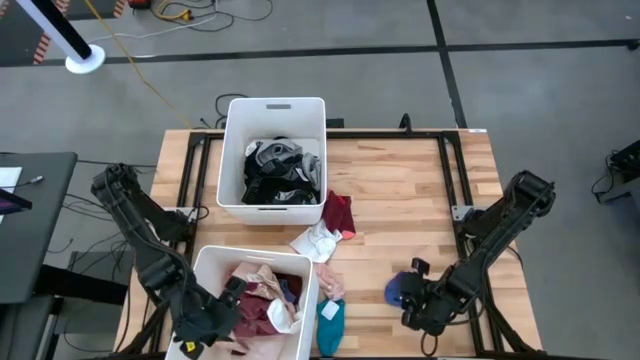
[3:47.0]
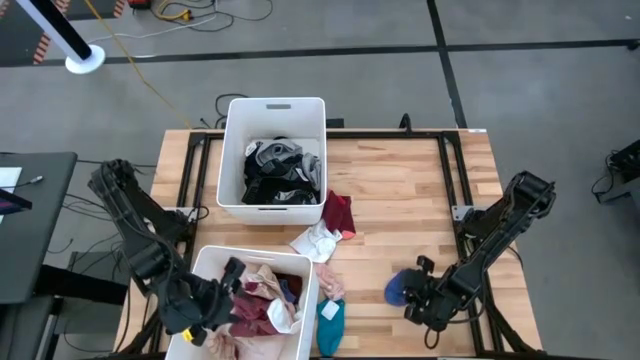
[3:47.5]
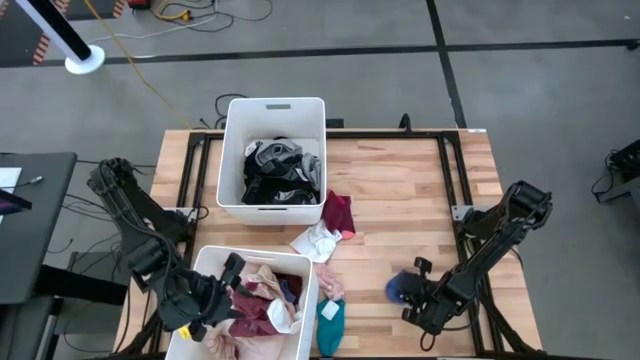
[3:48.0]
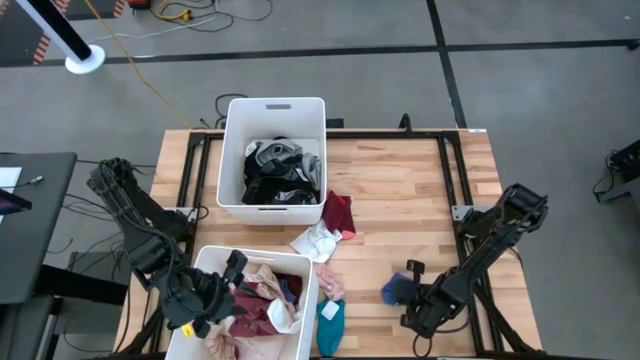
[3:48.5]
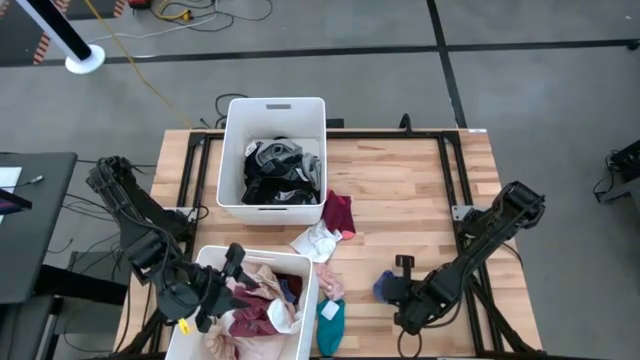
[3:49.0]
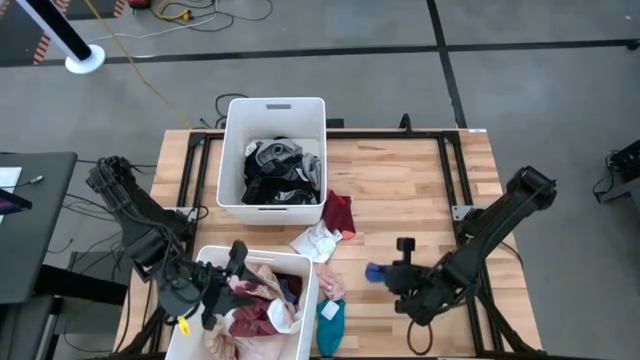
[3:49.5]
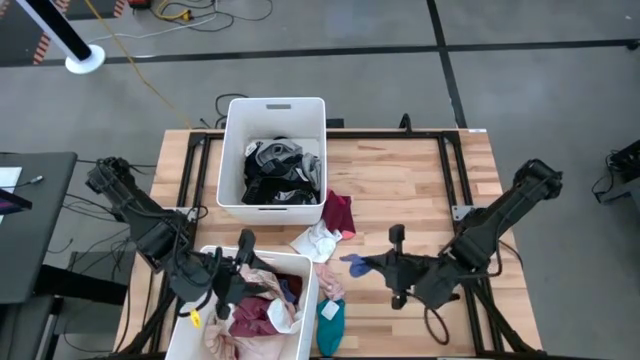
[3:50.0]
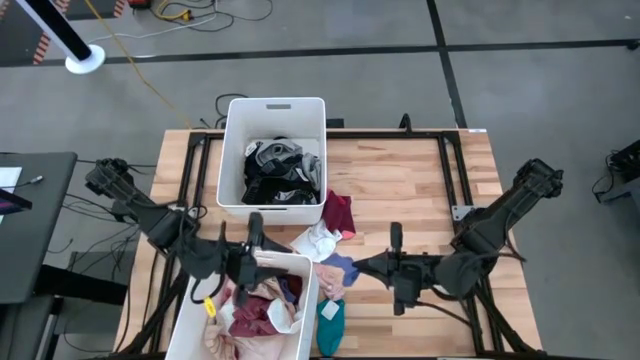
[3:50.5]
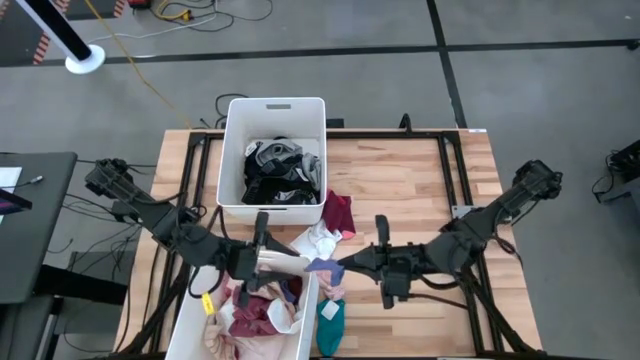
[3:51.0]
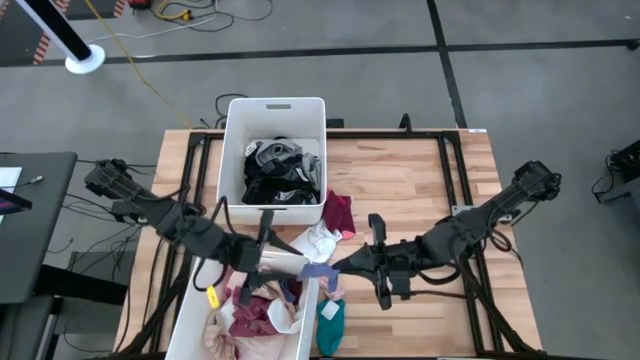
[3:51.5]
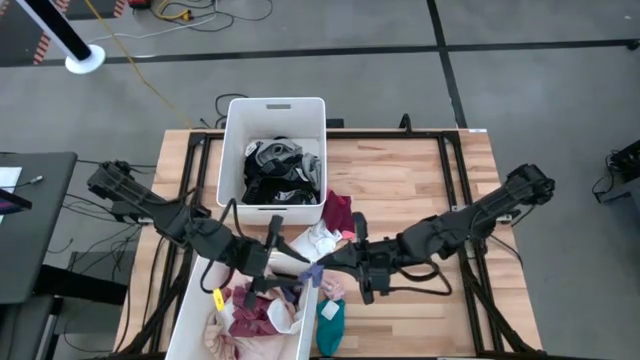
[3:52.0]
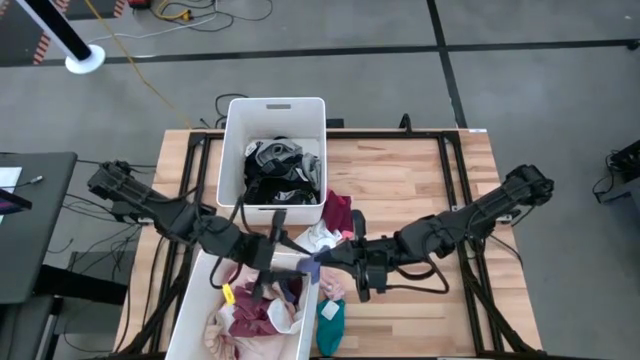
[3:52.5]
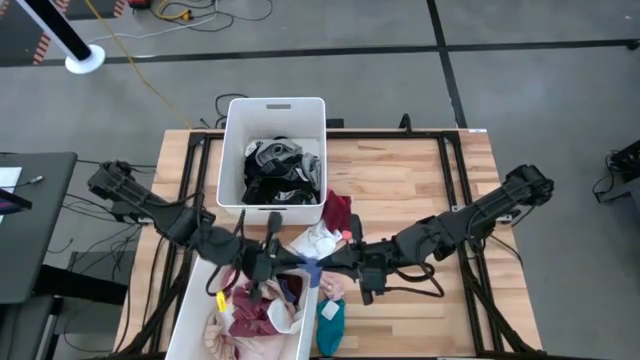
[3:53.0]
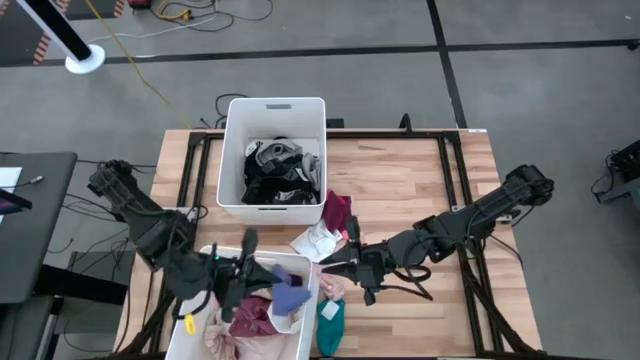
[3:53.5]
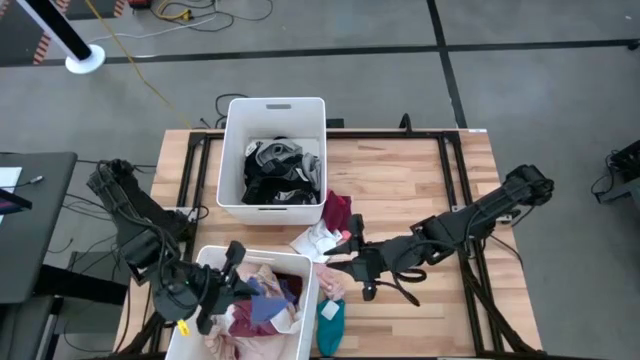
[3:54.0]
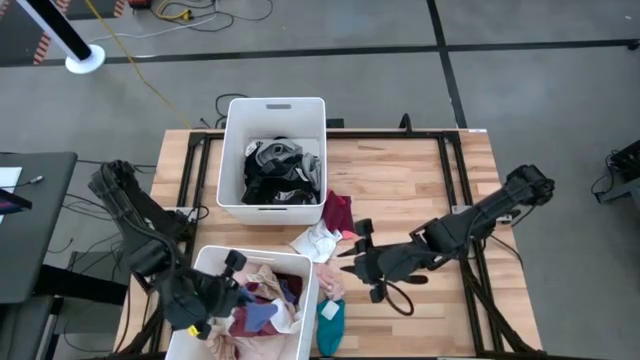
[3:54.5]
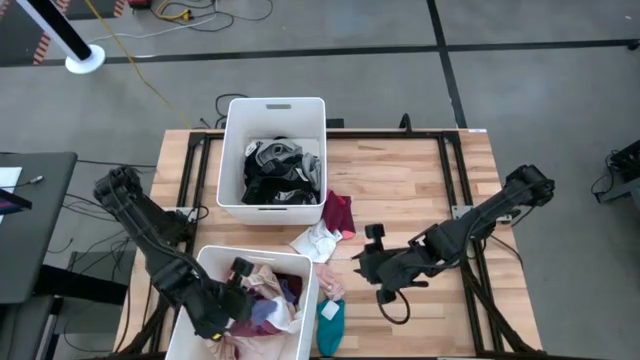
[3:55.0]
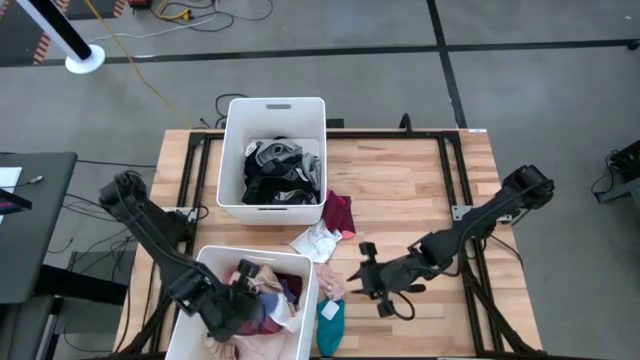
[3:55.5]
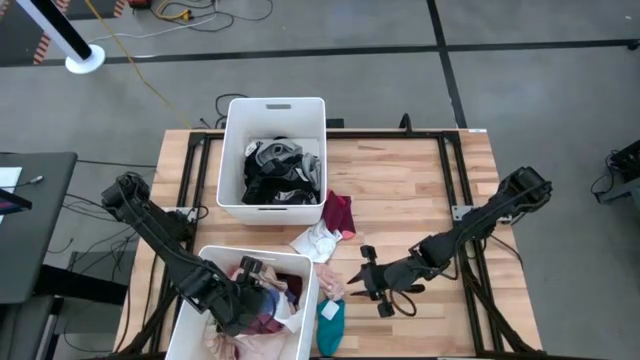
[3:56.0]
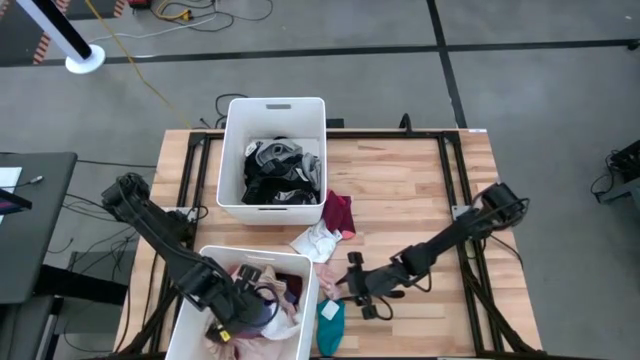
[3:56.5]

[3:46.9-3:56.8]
Task: Sort clothes
Put the purple sock into the bottom white laundry bin

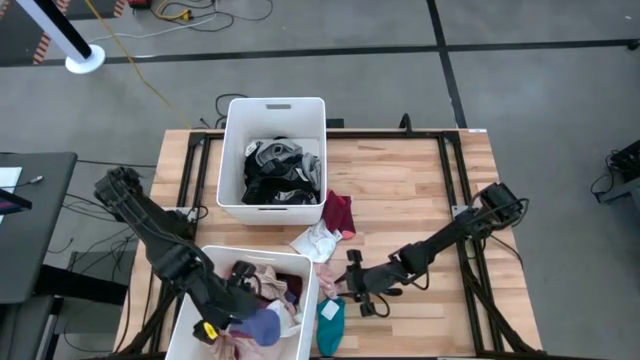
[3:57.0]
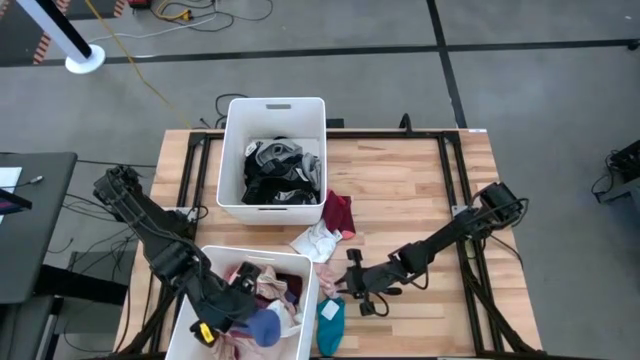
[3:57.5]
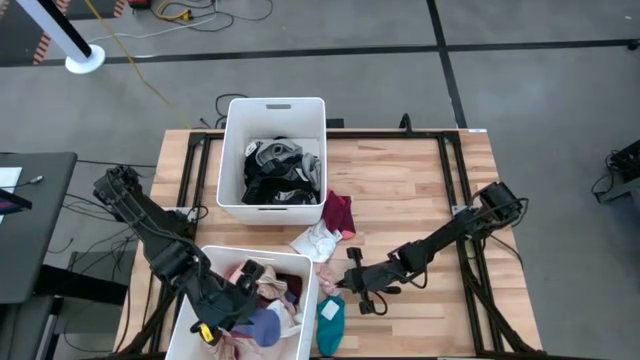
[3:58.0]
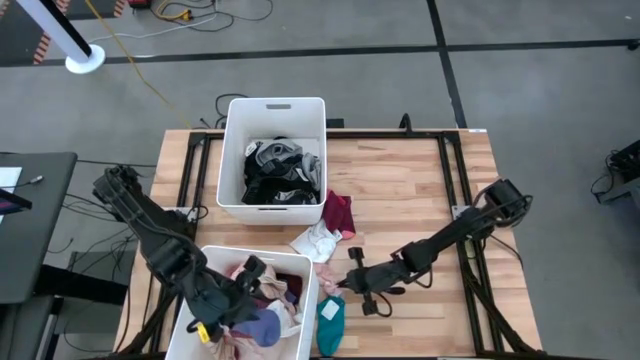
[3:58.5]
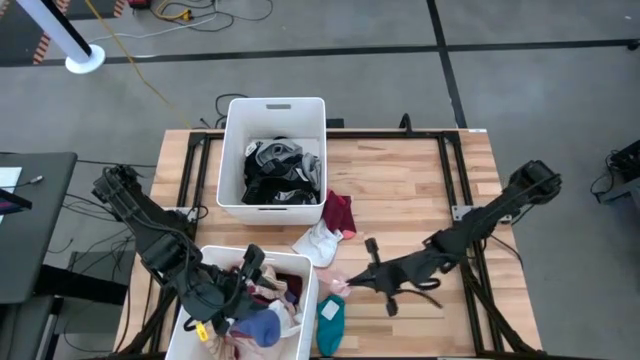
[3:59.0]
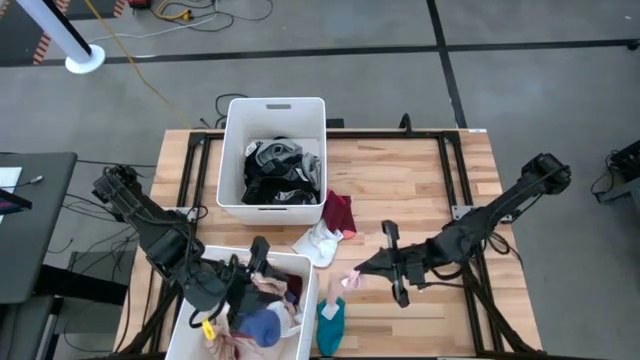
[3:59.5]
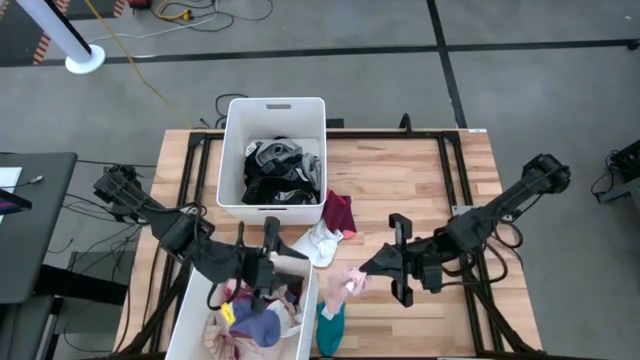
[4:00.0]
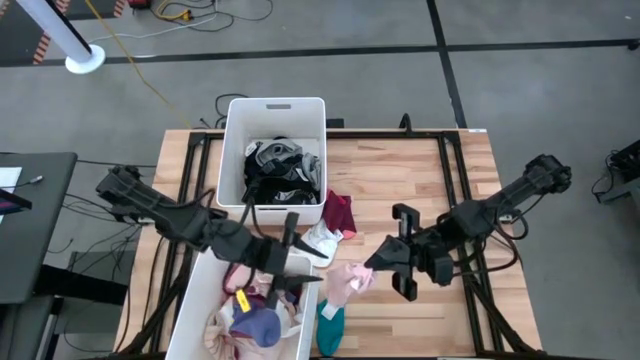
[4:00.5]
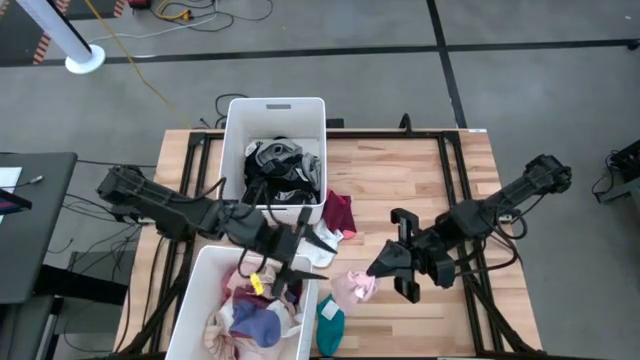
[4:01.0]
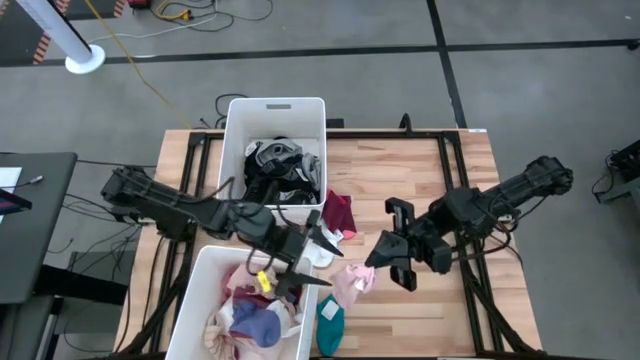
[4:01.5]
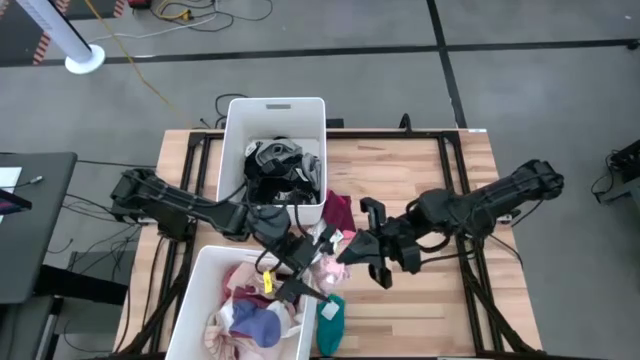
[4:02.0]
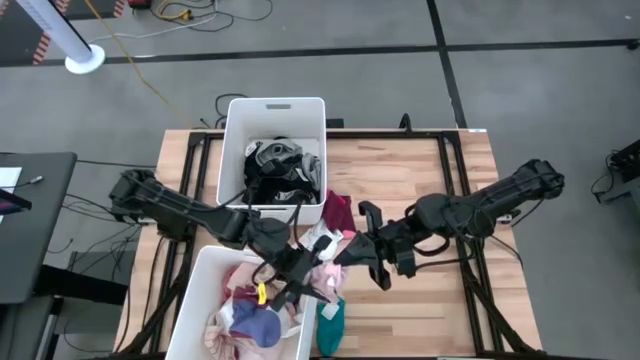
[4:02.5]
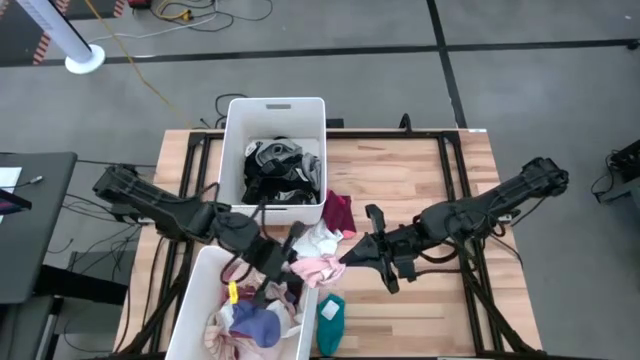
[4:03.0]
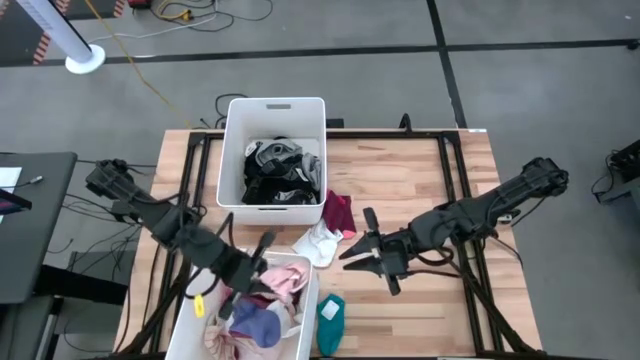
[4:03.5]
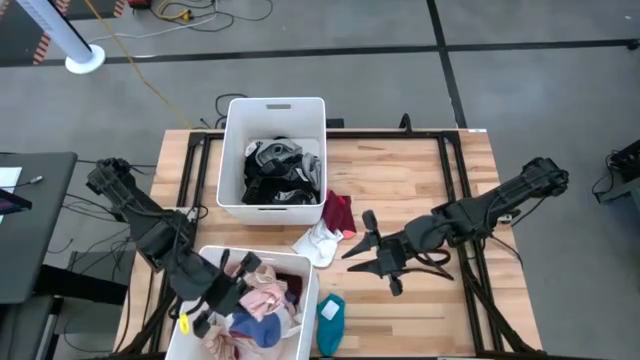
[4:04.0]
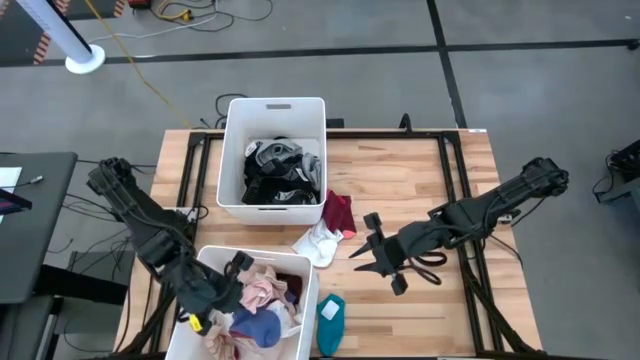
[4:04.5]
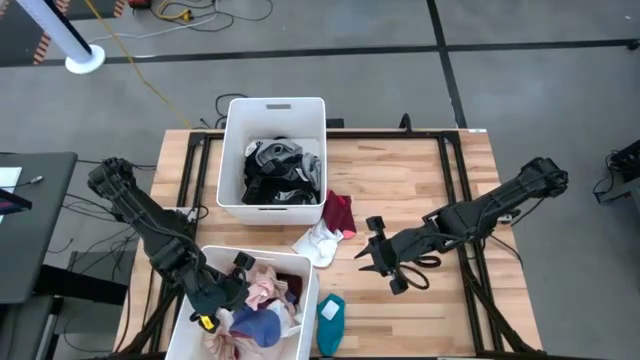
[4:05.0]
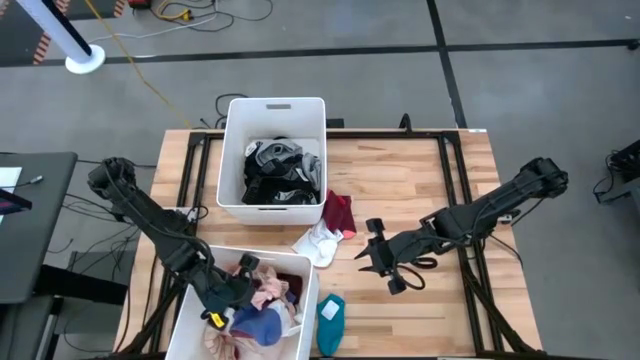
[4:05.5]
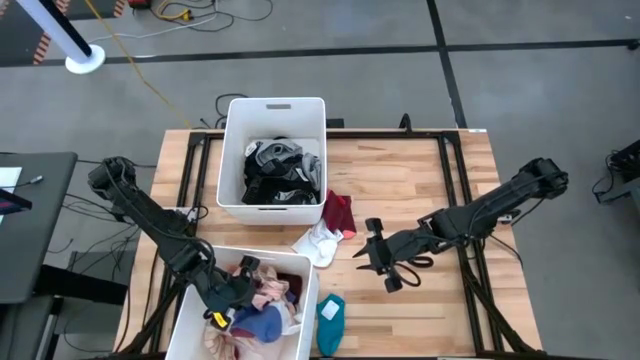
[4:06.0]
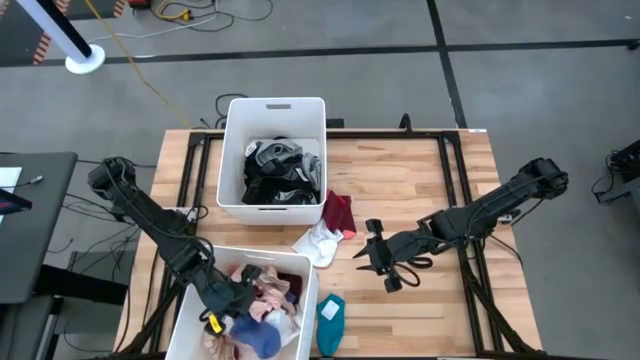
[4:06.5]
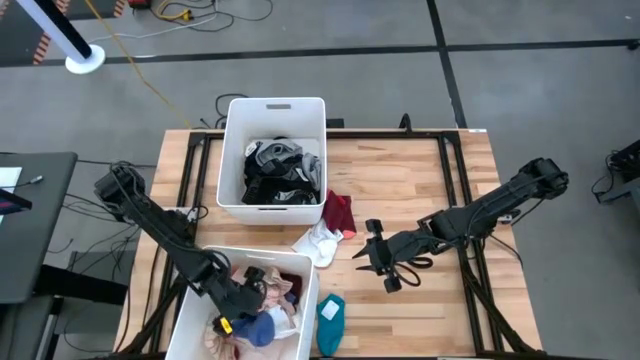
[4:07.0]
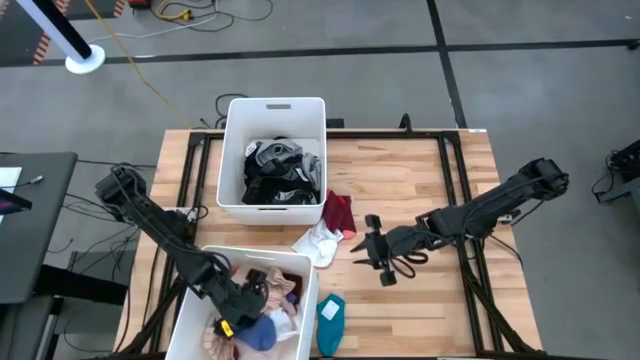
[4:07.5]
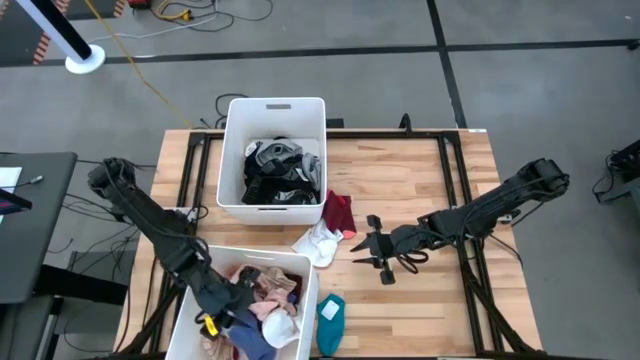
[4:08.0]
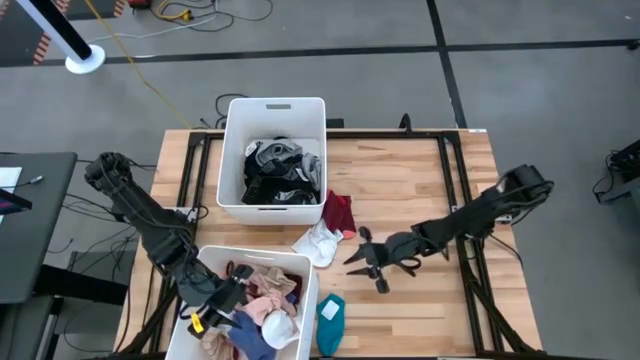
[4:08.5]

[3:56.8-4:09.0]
Put the pink sock into the bottom white laundry bin
